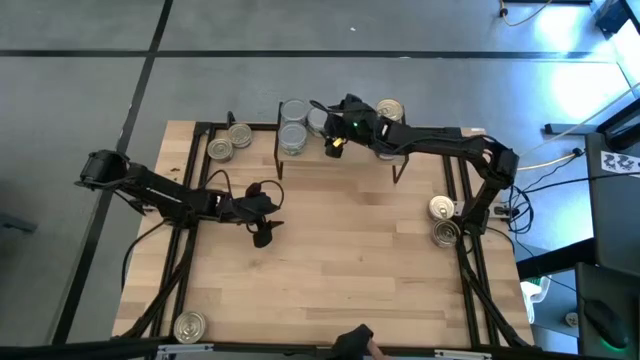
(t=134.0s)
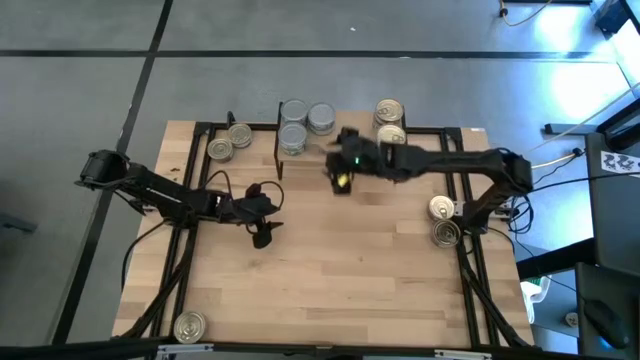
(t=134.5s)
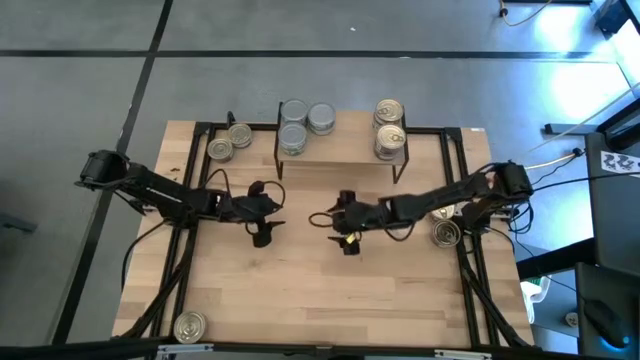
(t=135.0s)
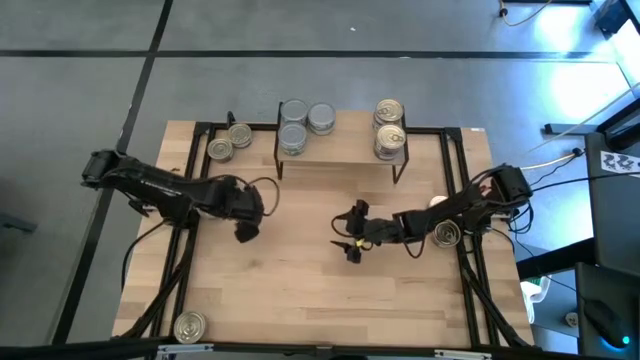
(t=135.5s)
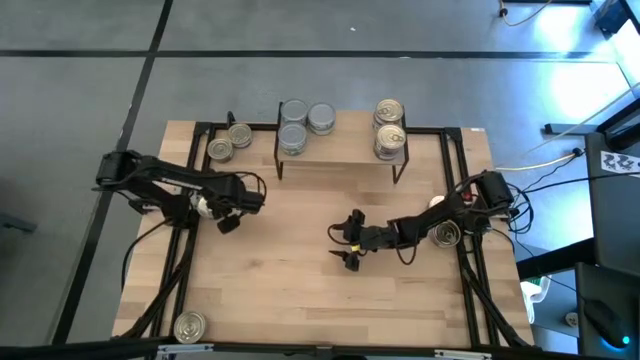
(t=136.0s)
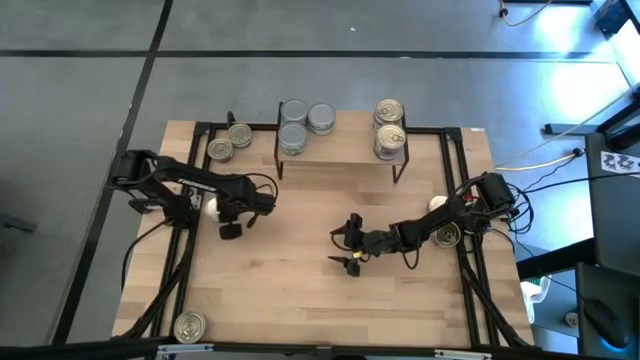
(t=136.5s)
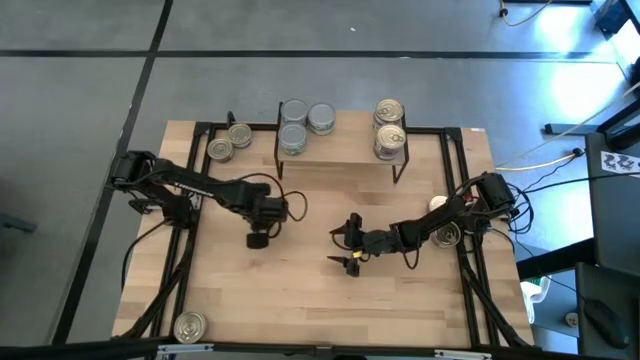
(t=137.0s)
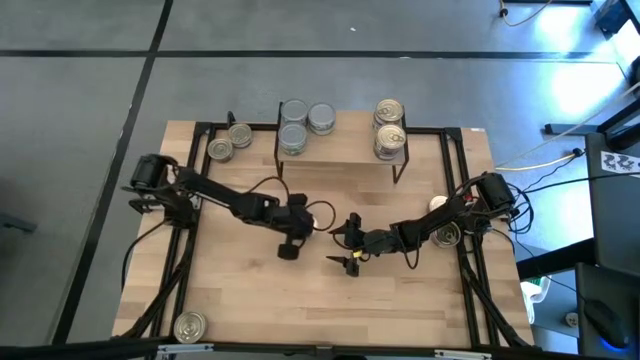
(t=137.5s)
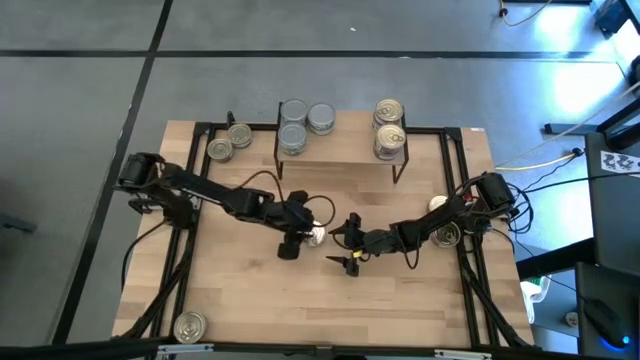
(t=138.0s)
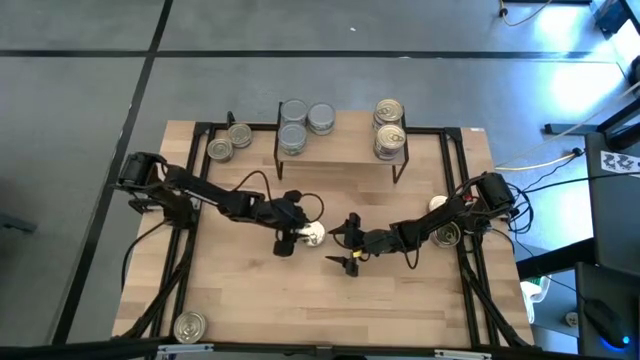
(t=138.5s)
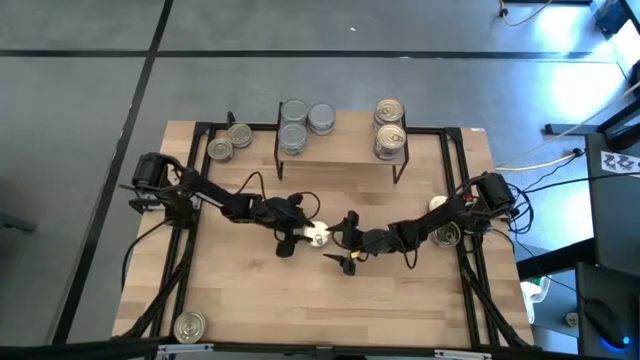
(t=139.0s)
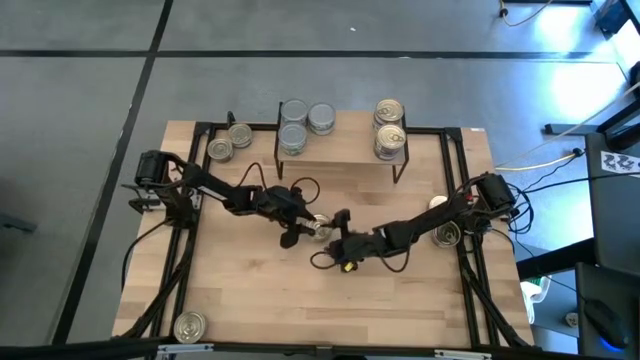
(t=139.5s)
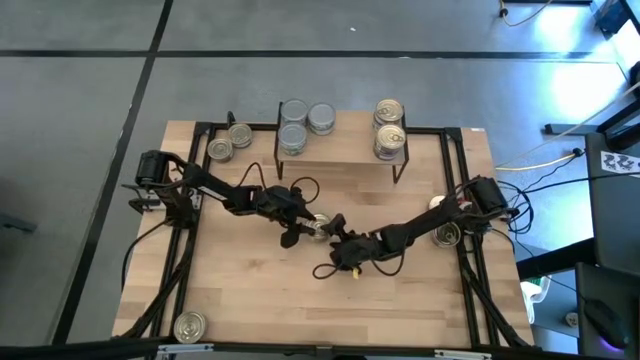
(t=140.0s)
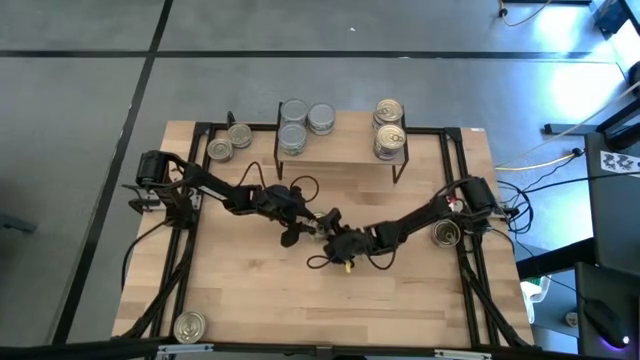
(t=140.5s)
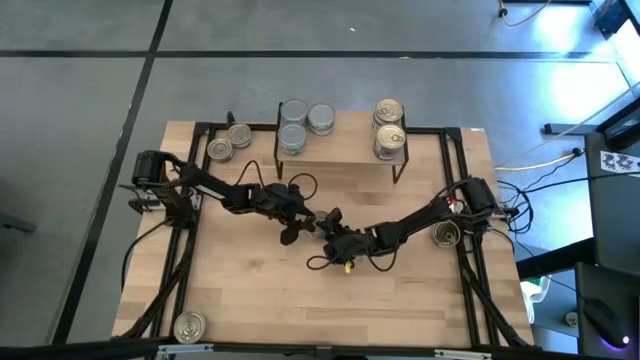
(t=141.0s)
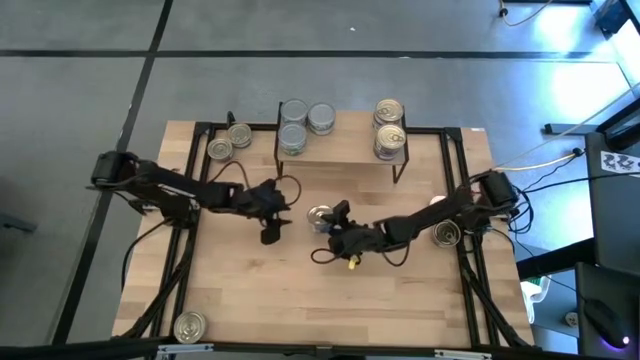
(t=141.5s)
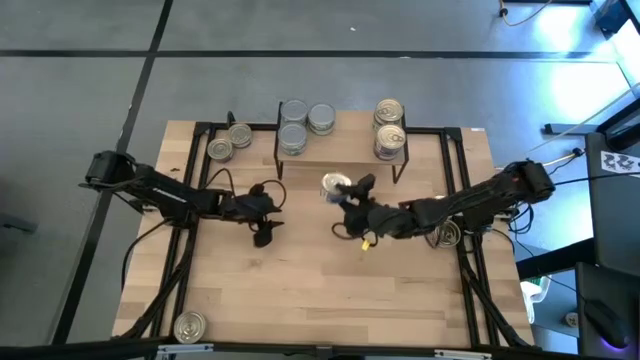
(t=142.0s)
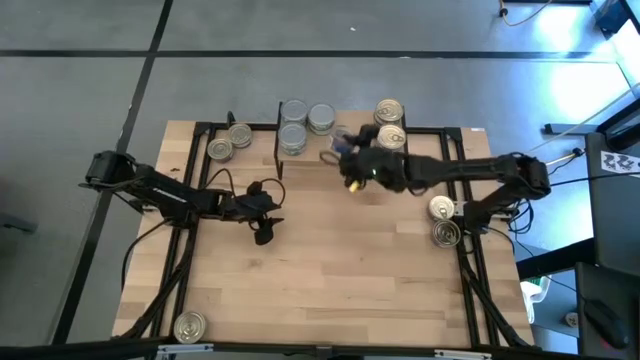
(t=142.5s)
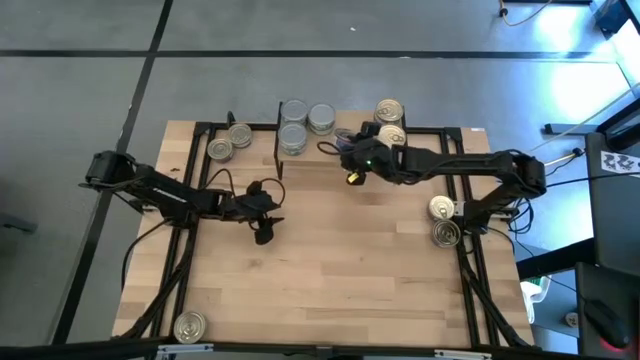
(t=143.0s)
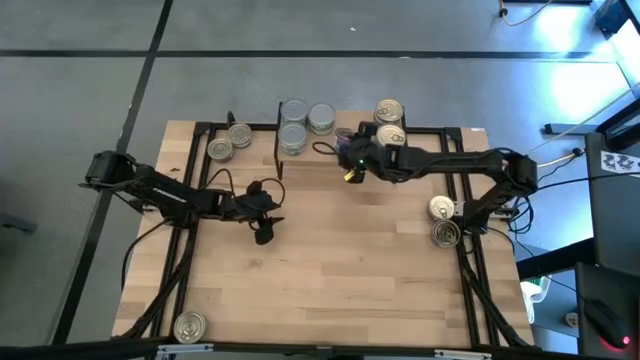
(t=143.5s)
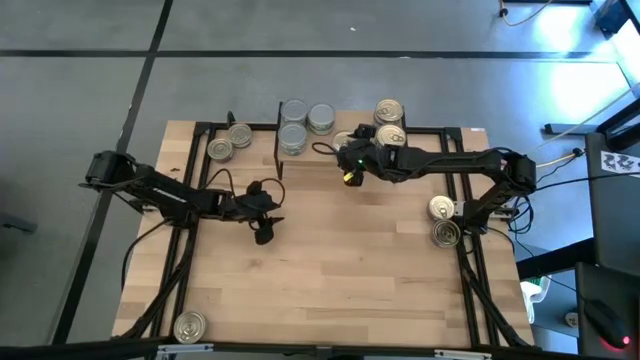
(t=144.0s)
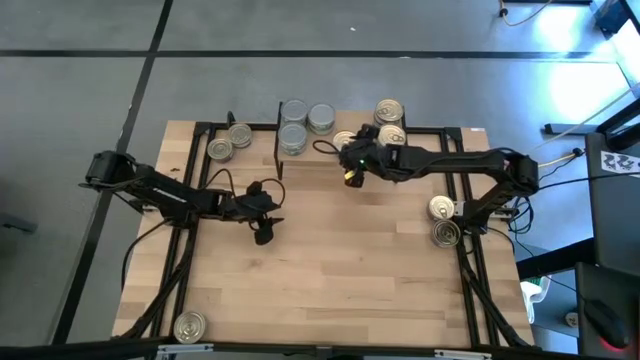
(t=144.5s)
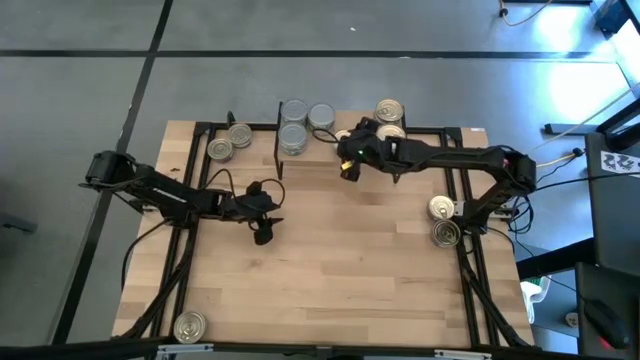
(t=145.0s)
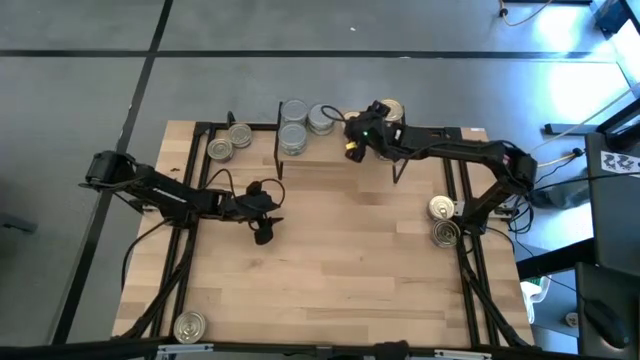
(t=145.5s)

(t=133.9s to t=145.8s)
Task: Stack canned seafood by type on shelf
Put the blue pink tuna can on the shelf

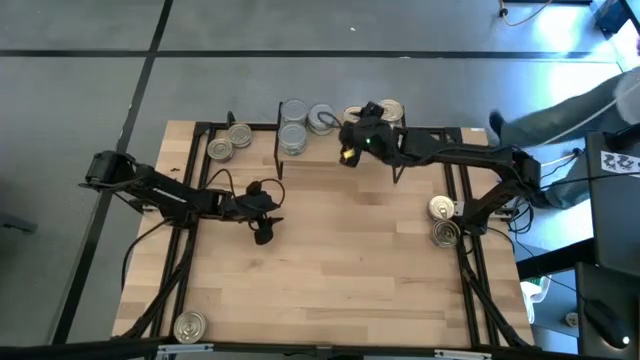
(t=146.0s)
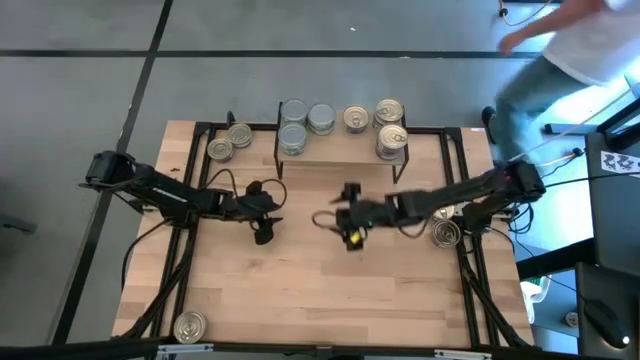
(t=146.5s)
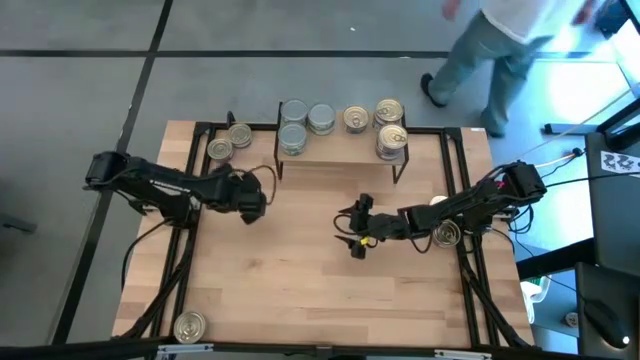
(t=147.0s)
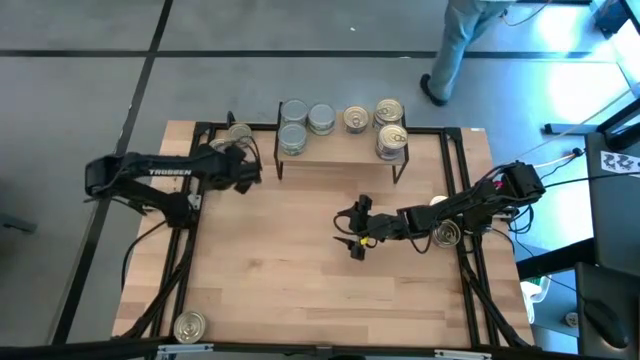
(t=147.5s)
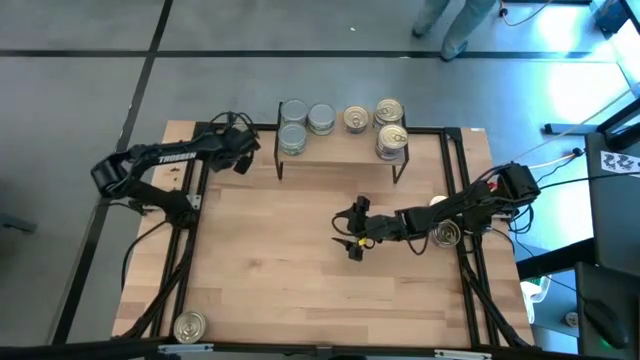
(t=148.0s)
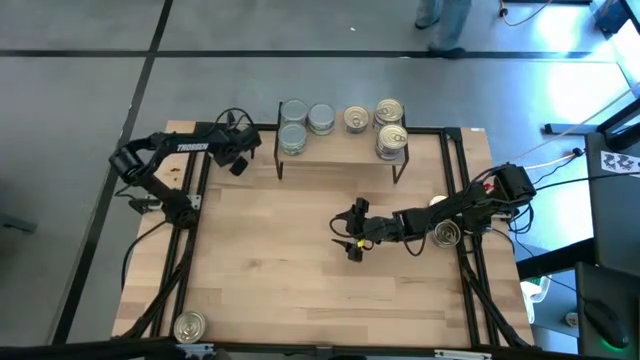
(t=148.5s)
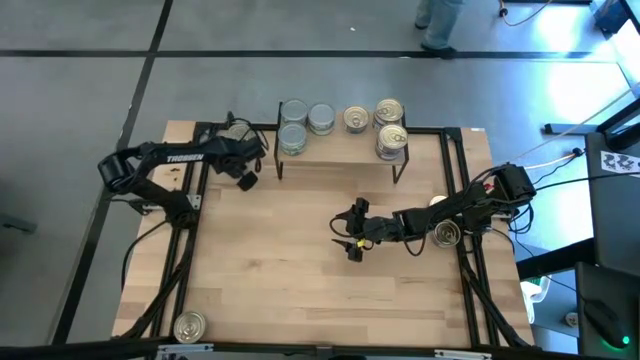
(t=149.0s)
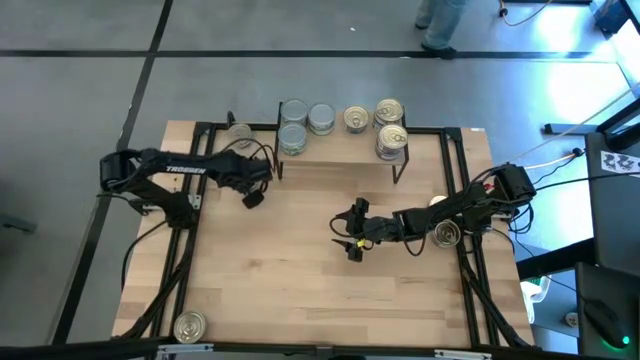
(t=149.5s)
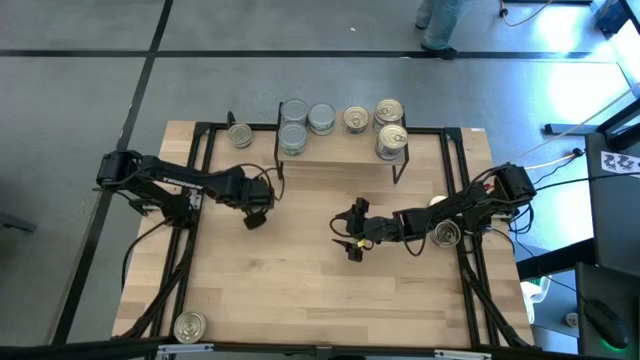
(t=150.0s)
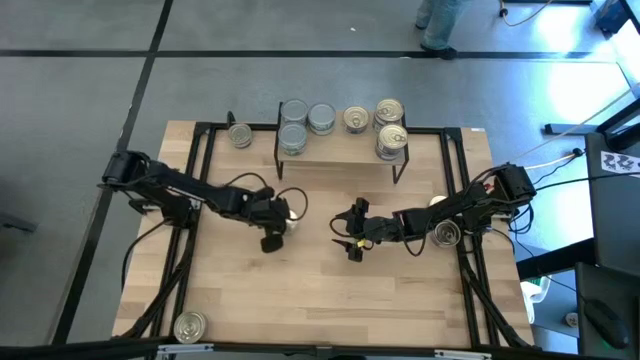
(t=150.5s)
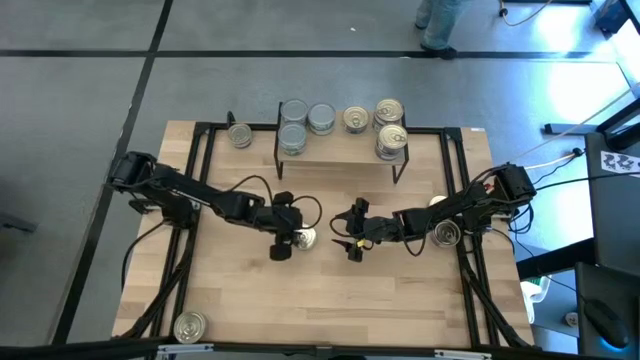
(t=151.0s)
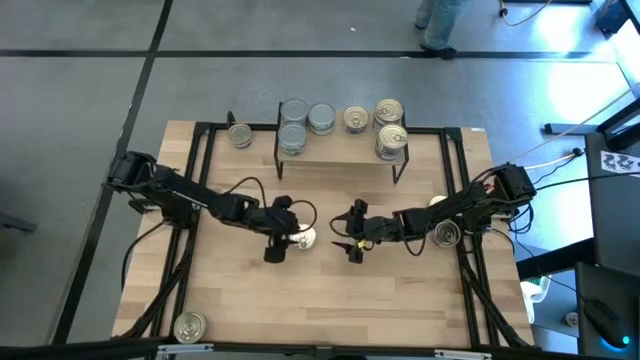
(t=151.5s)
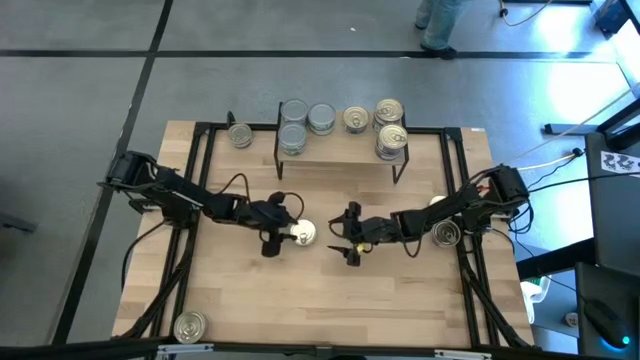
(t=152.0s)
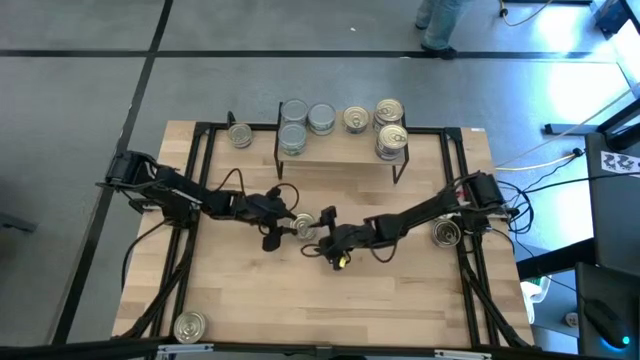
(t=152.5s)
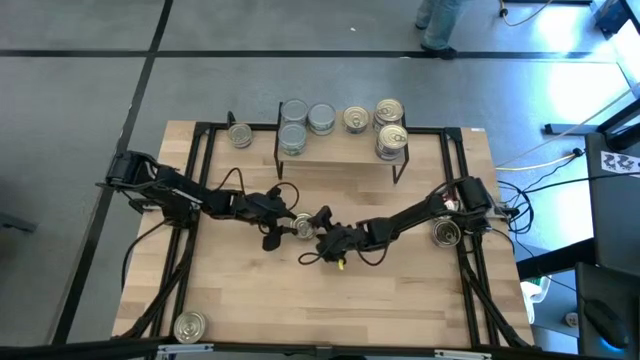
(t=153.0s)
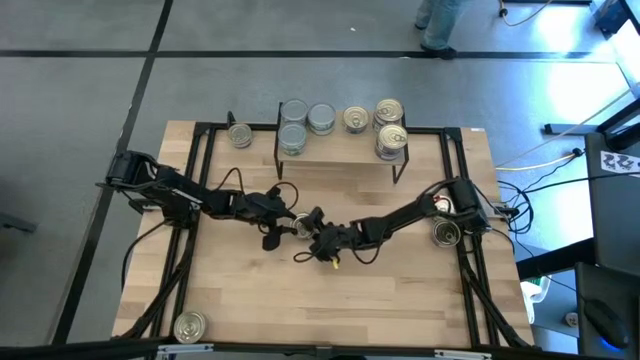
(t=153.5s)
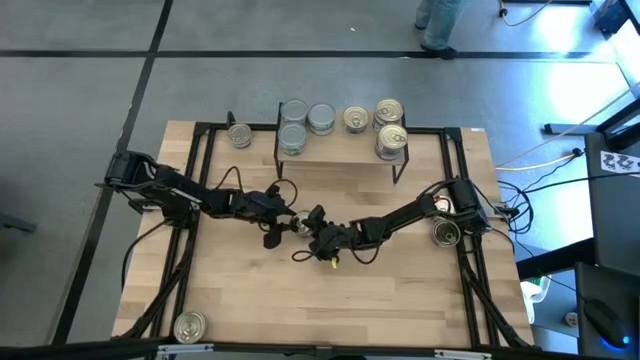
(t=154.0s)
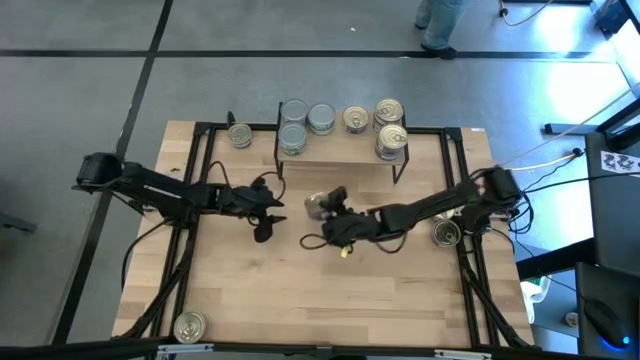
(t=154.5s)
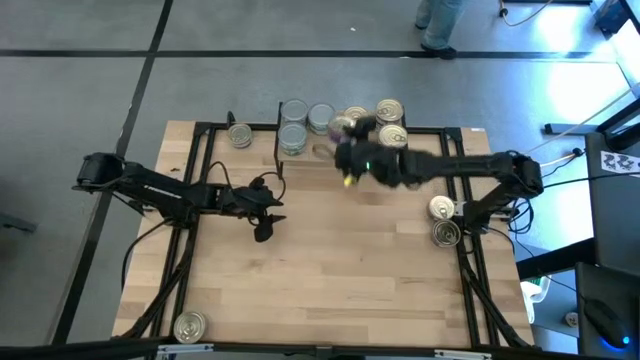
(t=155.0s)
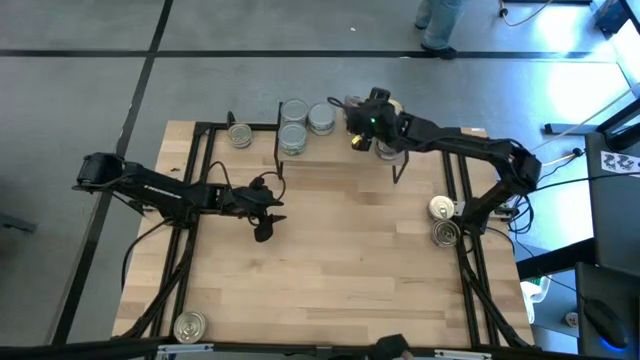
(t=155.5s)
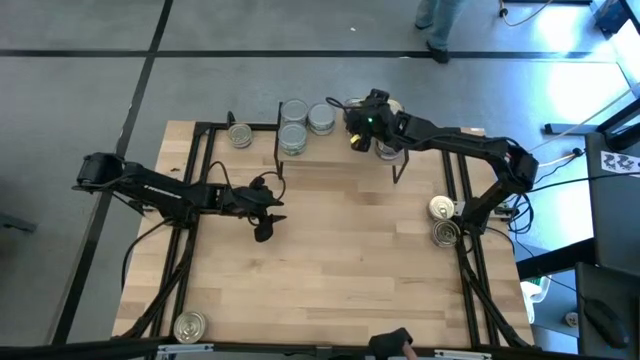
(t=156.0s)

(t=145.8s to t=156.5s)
Stack the blue pink tuna can on top of the other blue pink tuna can on the shelf
